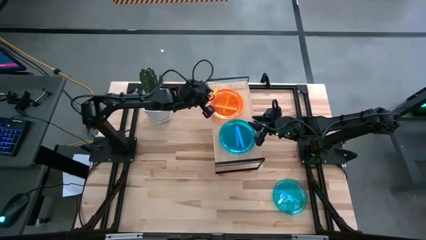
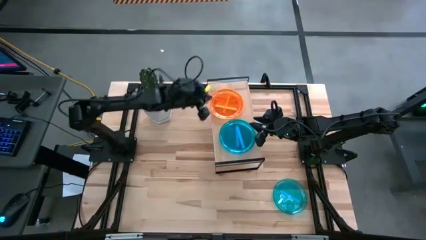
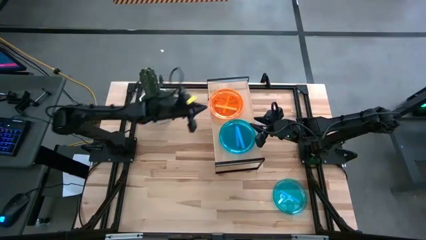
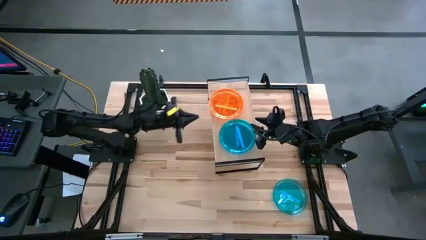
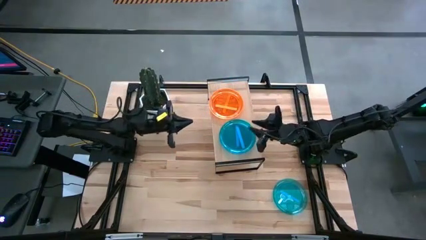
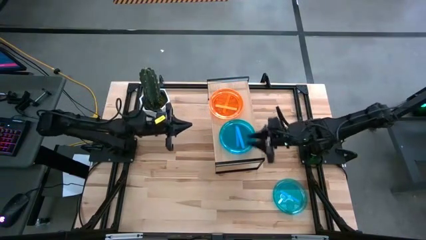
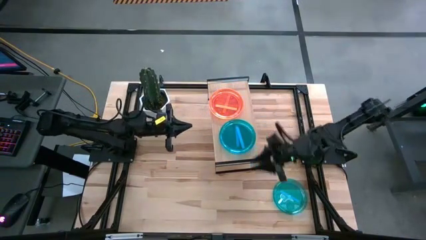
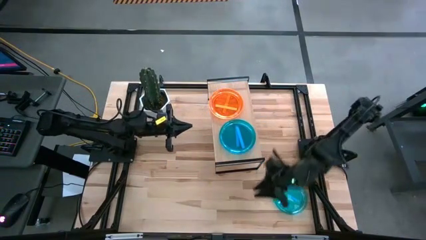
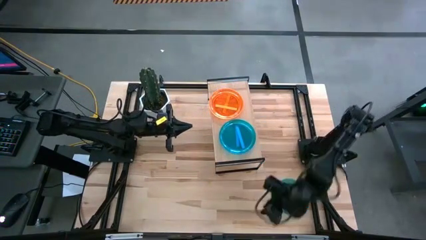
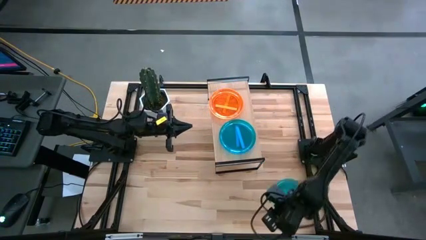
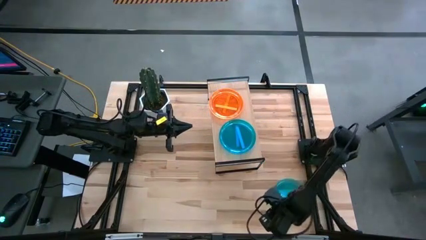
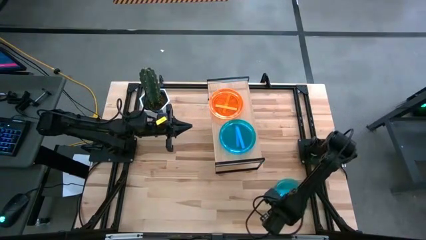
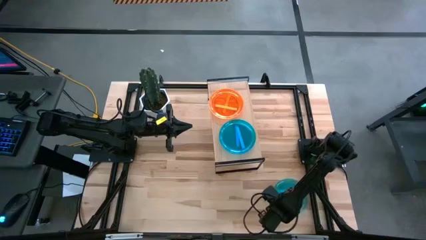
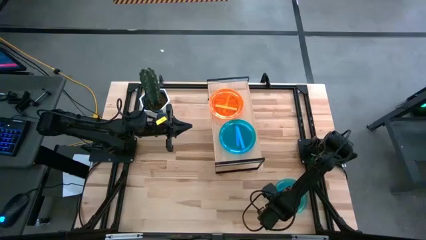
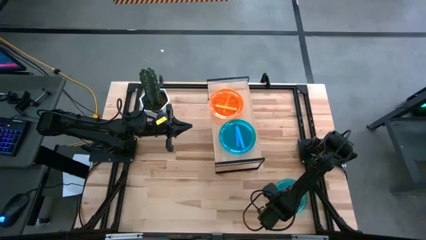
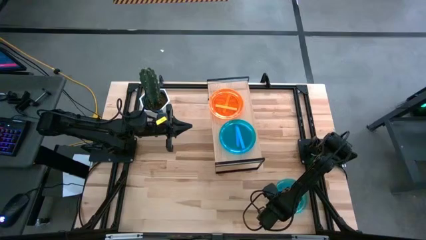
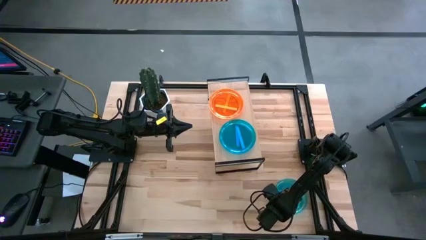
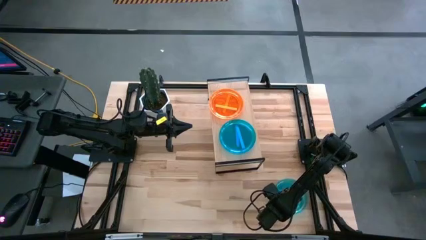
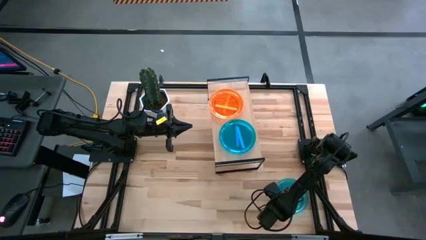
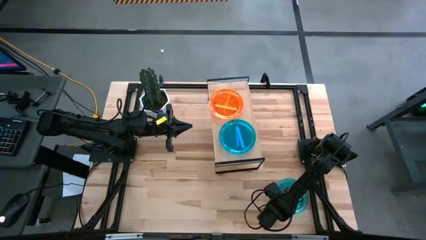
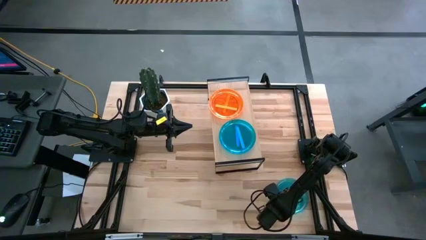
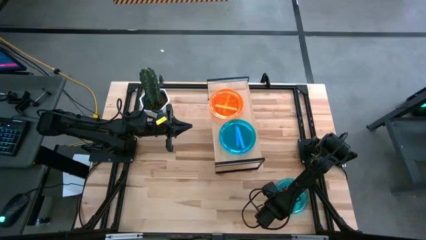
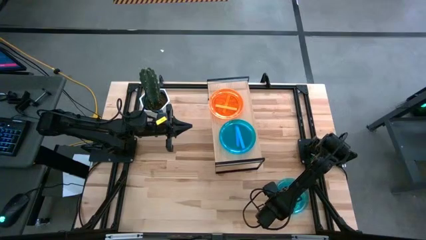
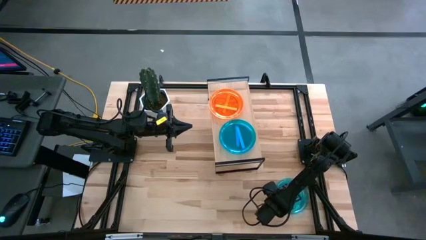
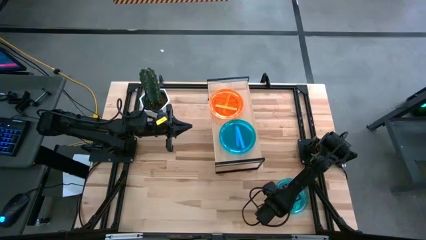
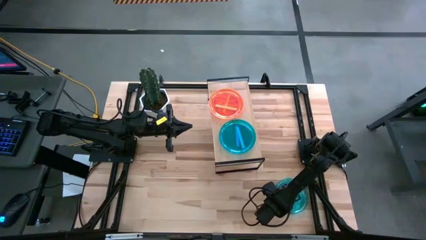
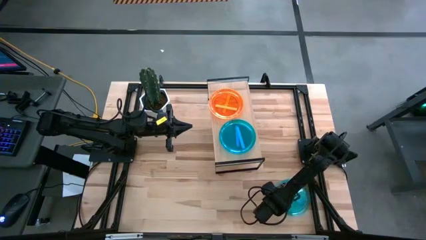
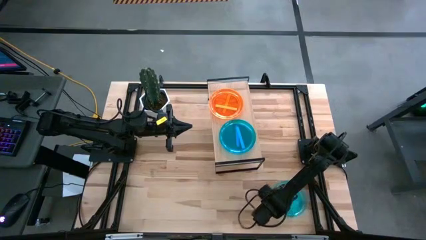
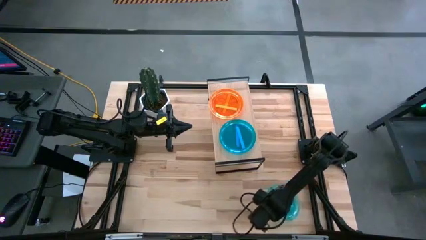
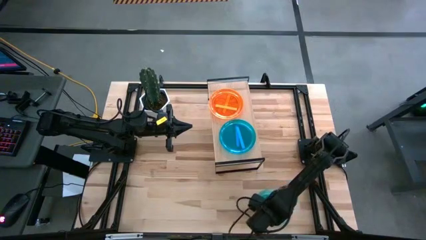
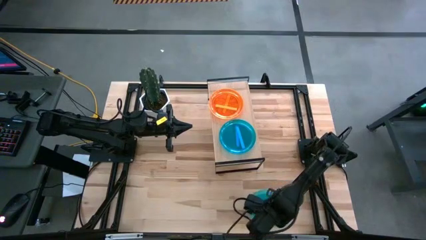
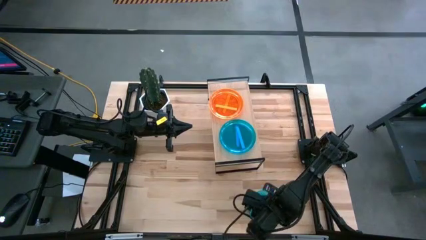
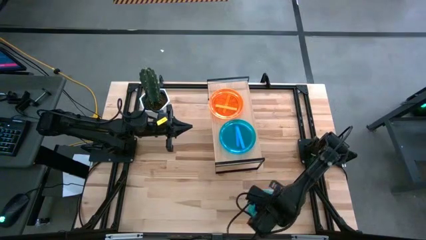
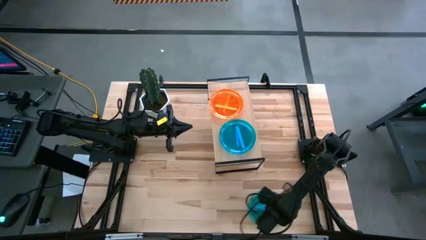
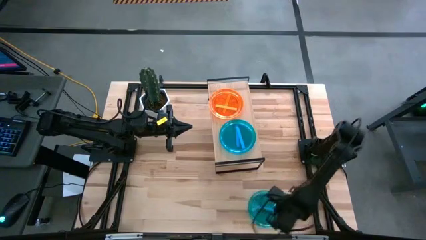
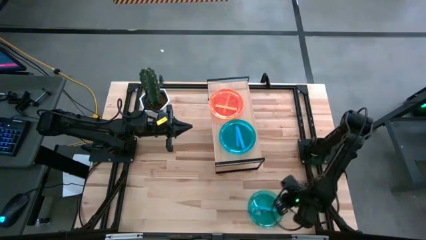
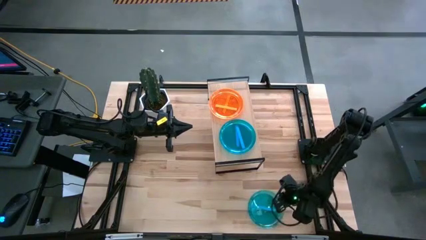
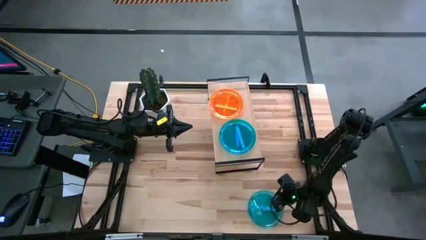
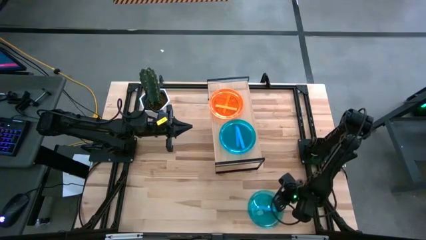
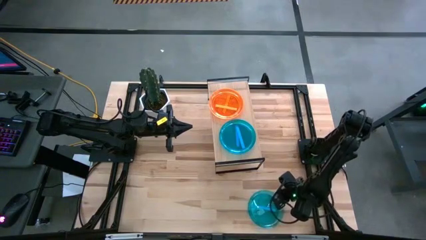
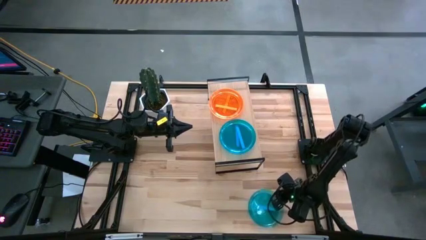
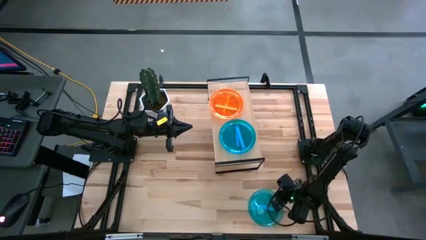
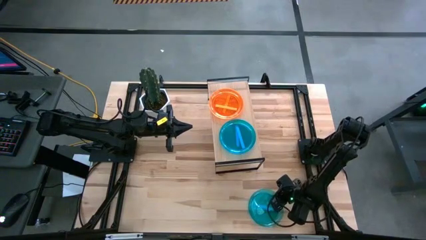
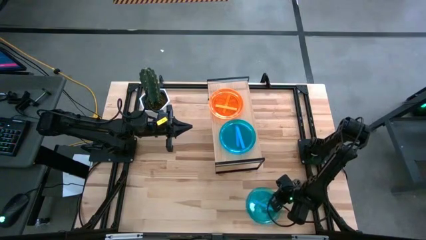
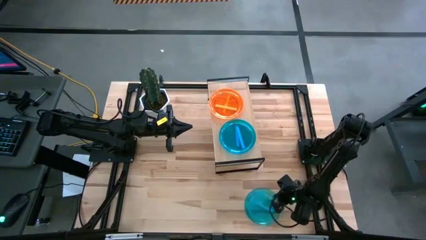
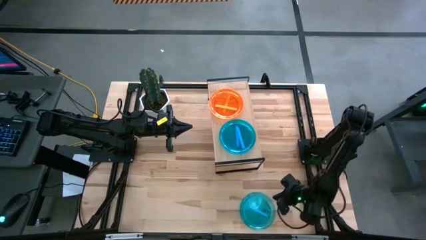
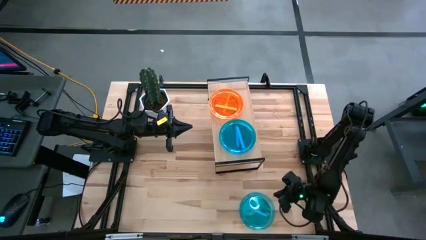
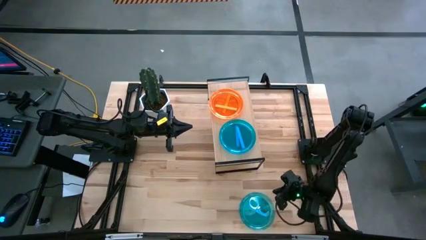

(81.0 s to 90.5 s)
Task: Place and stack plates onto a shelf
Stack the blue plate on top of the blue plates on the shelf

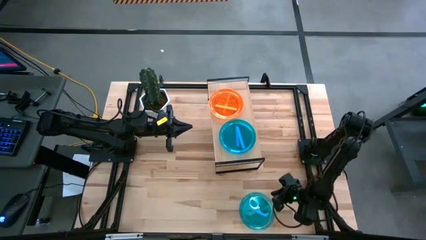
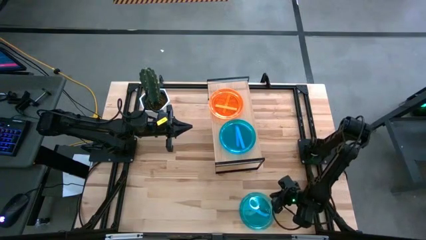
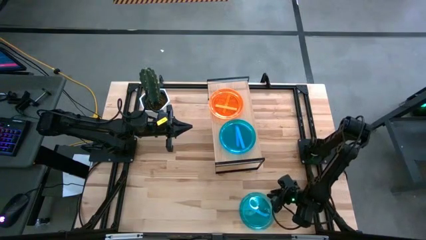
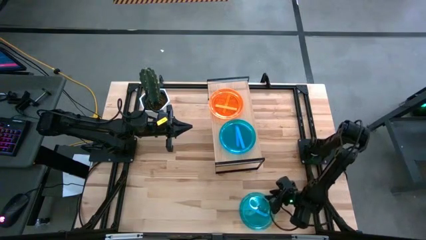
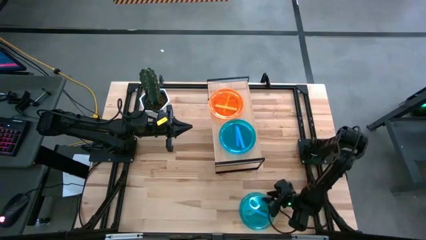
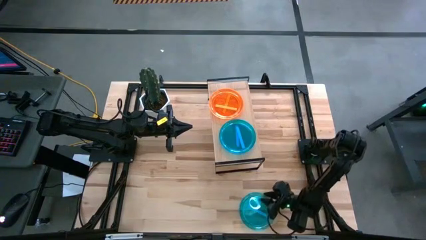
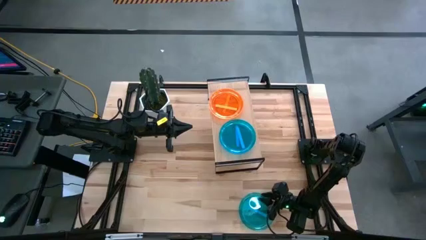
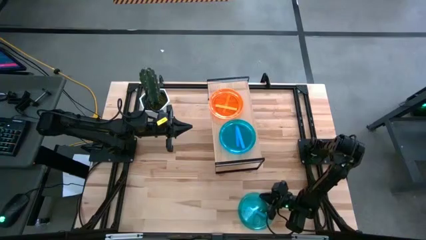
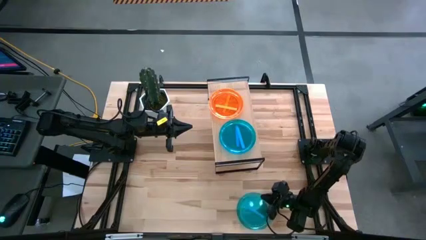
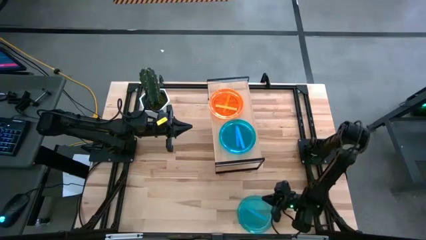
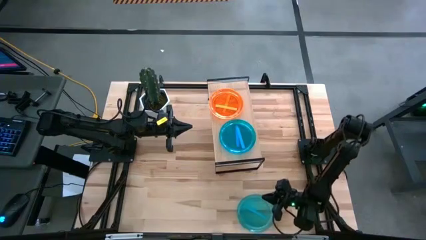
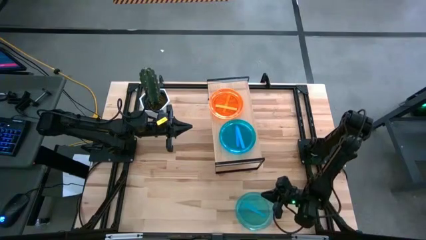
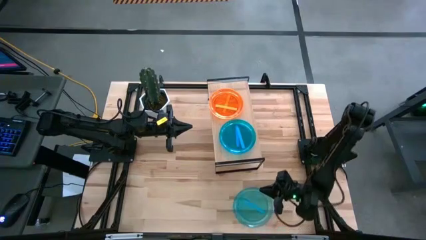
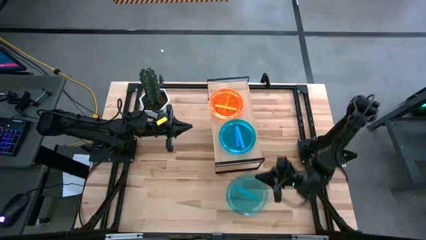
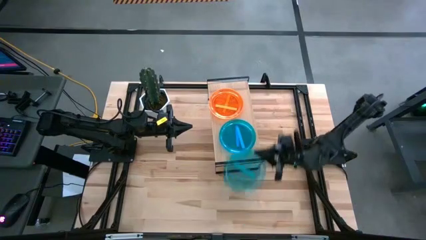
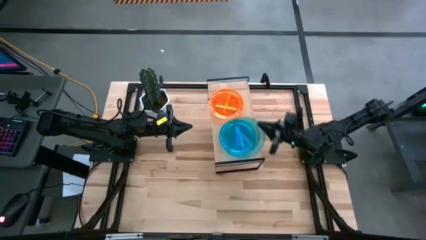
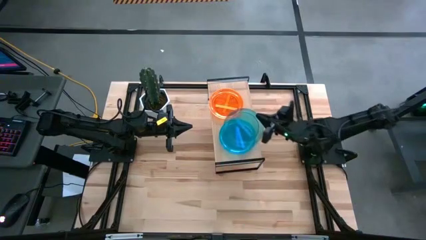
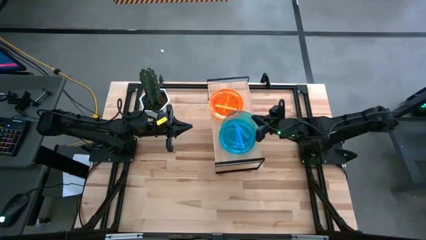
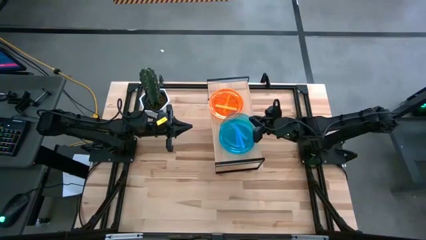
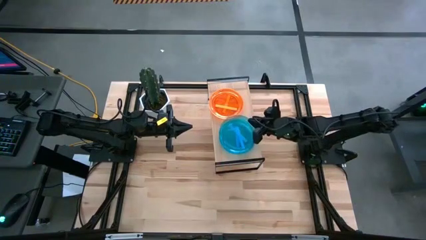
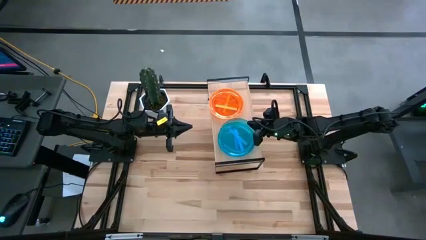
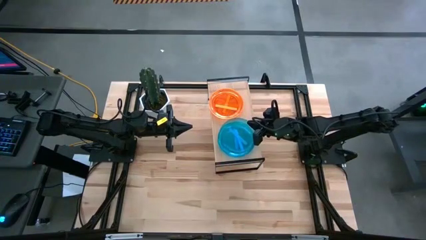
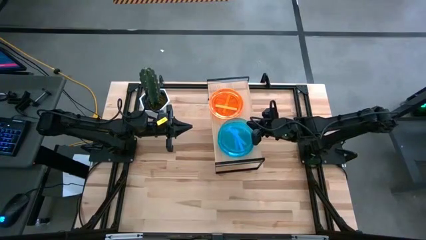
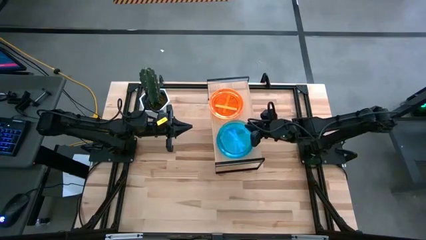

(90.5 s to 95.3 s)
Stack the blue plate on top of the blue plates on the shelf
